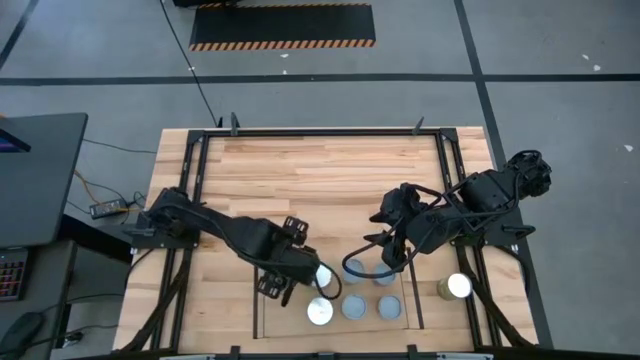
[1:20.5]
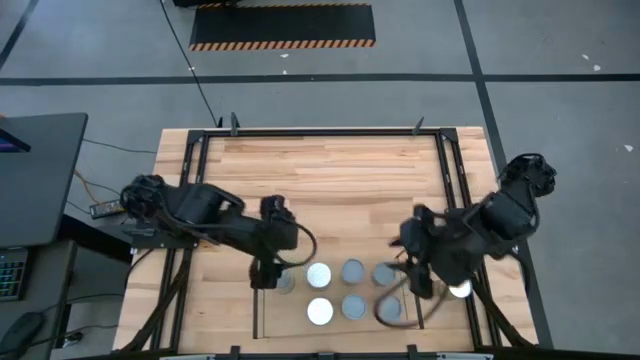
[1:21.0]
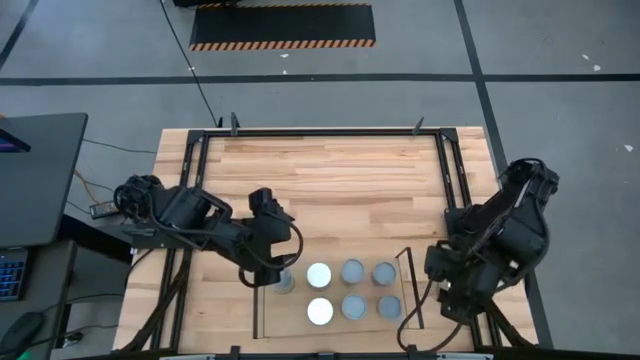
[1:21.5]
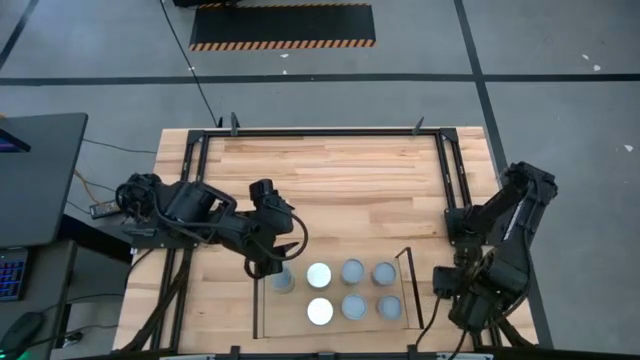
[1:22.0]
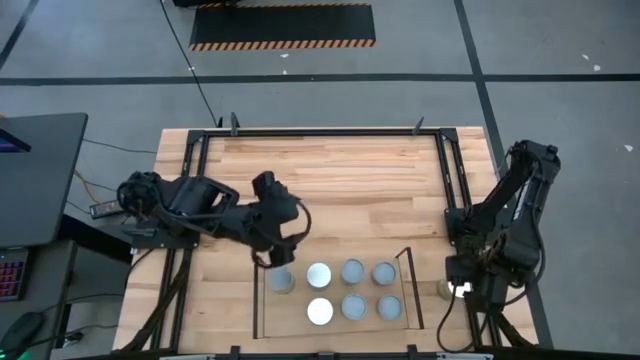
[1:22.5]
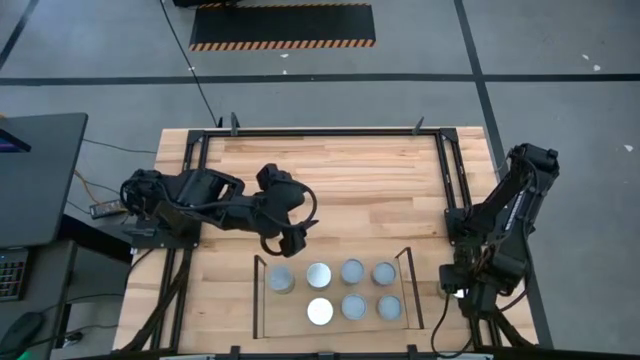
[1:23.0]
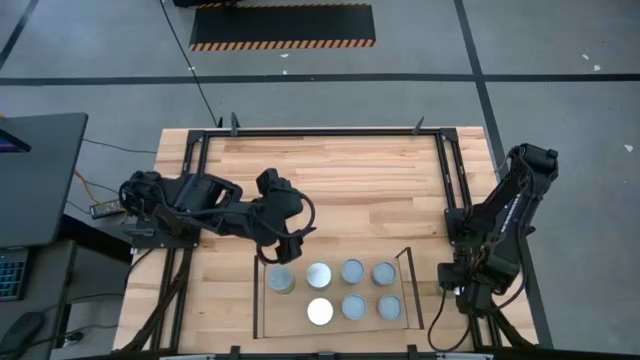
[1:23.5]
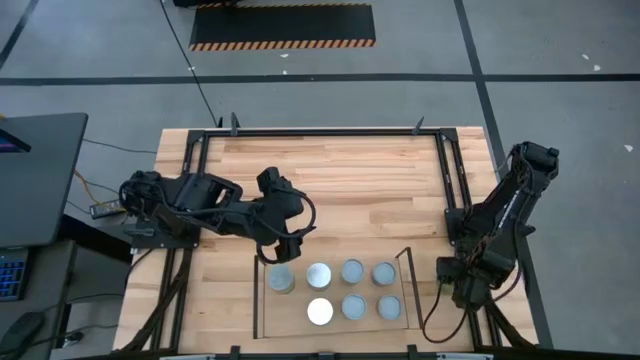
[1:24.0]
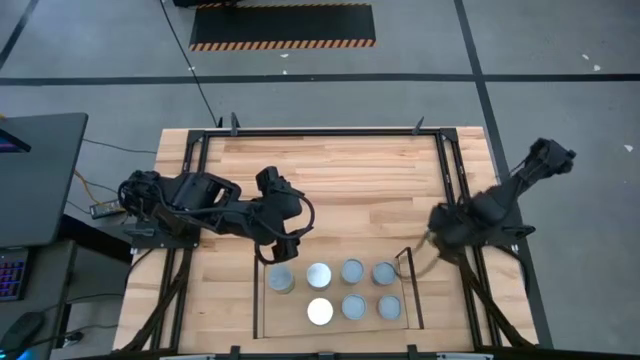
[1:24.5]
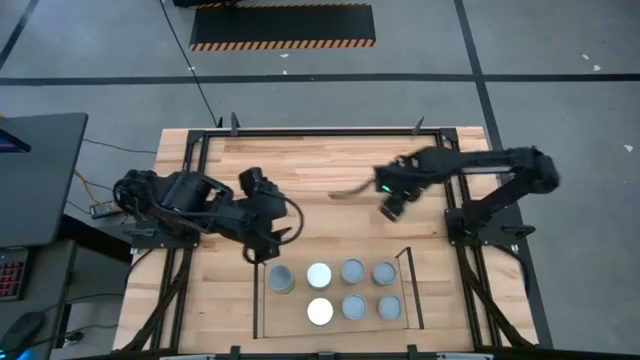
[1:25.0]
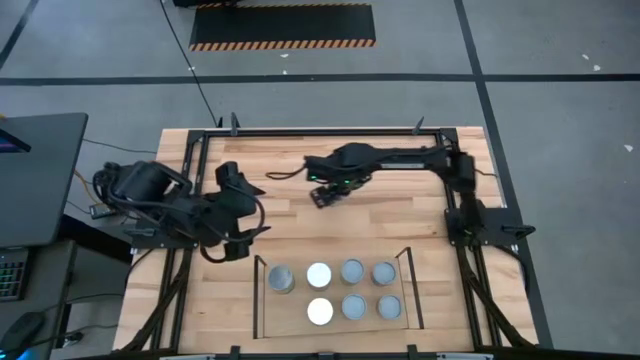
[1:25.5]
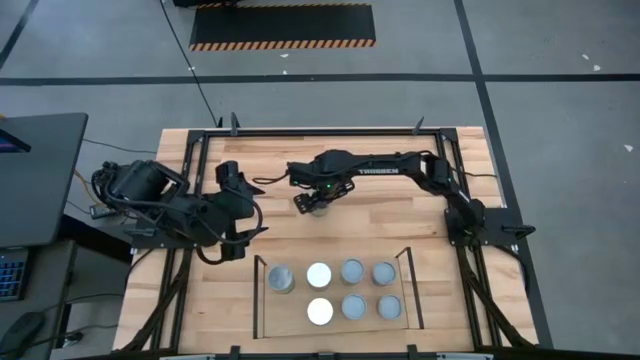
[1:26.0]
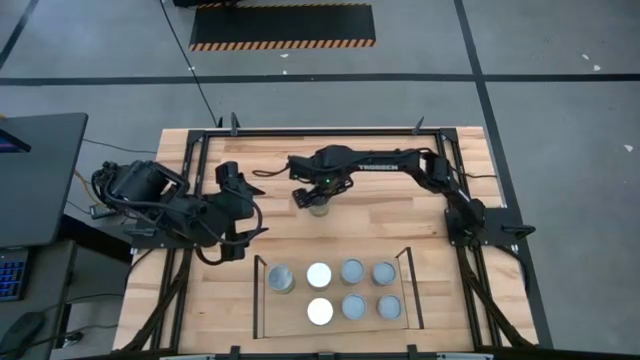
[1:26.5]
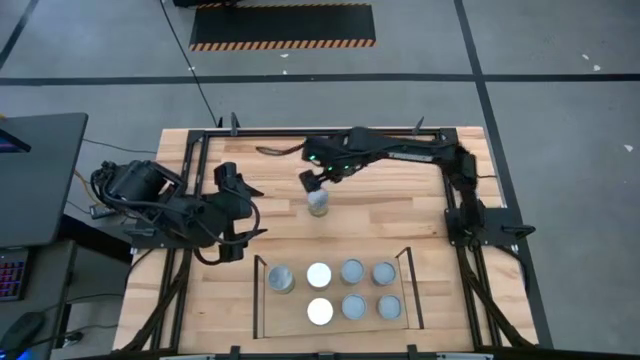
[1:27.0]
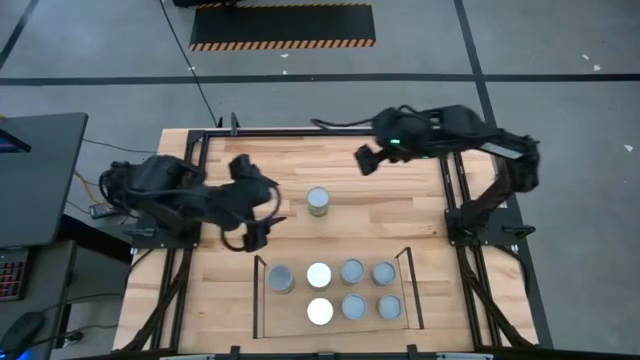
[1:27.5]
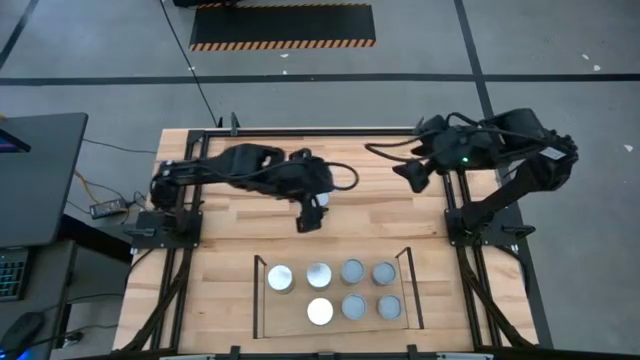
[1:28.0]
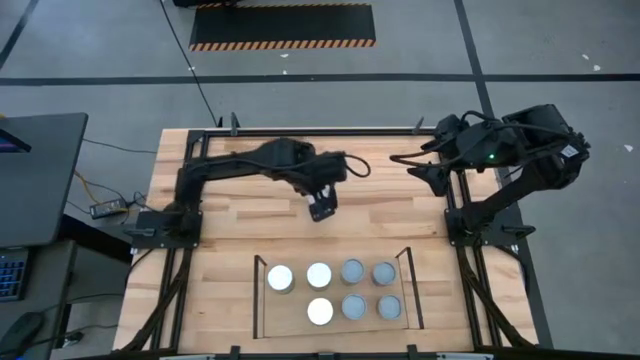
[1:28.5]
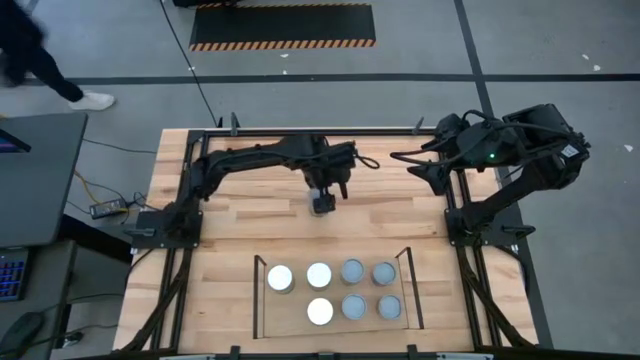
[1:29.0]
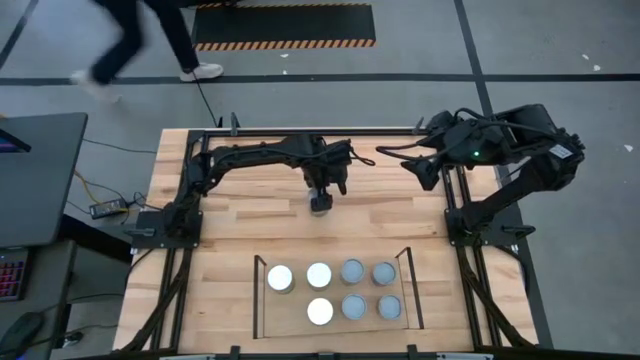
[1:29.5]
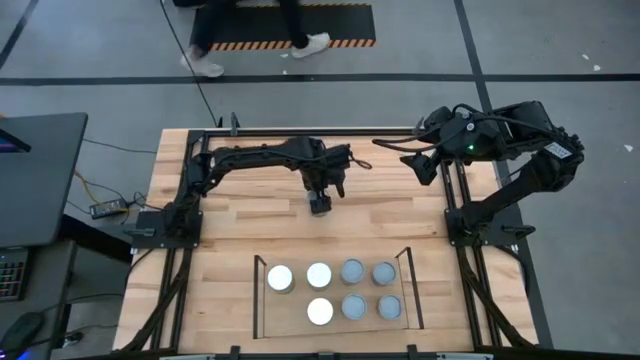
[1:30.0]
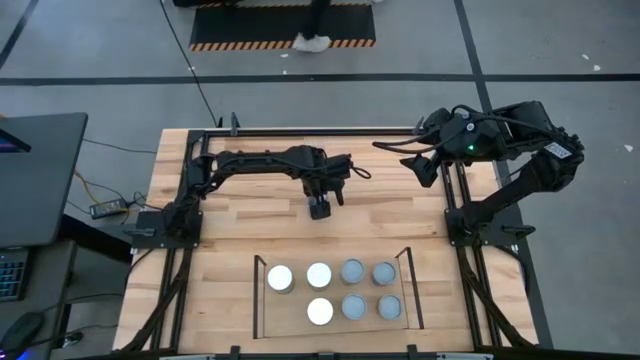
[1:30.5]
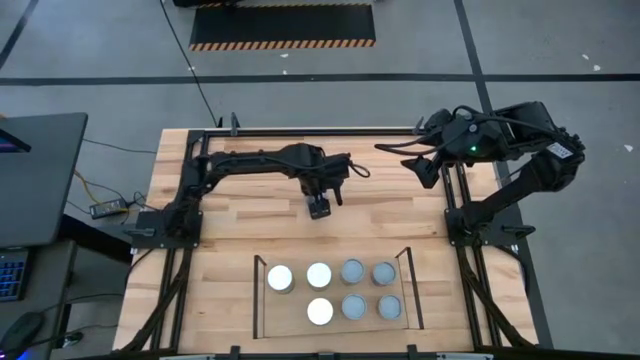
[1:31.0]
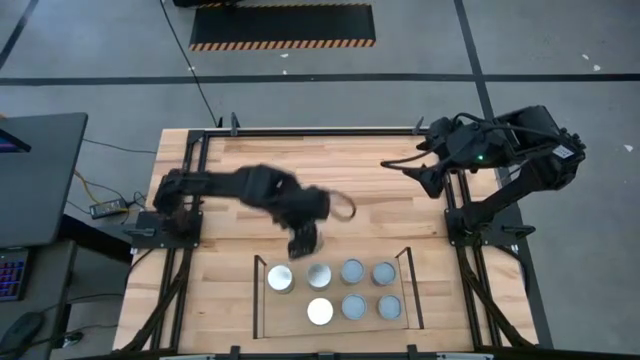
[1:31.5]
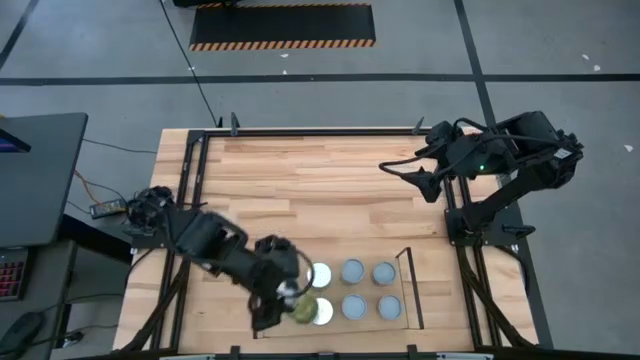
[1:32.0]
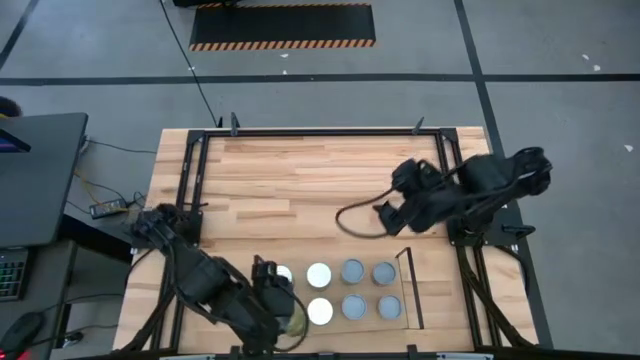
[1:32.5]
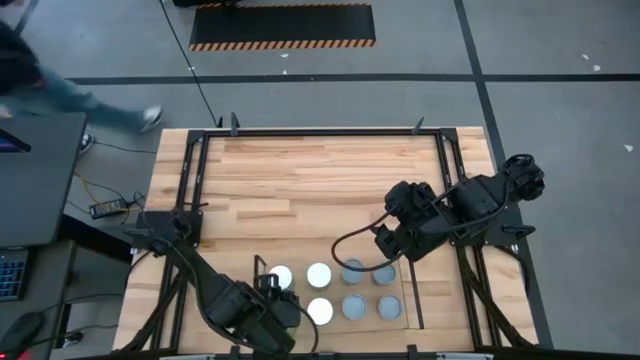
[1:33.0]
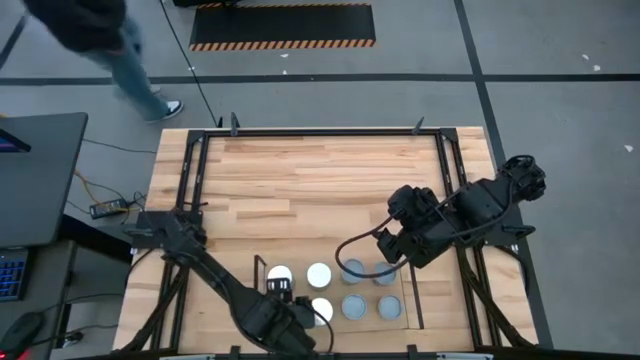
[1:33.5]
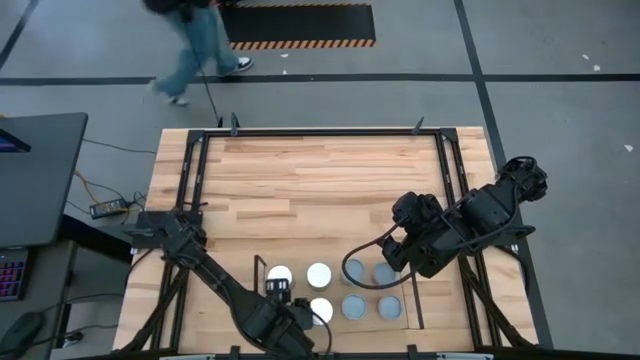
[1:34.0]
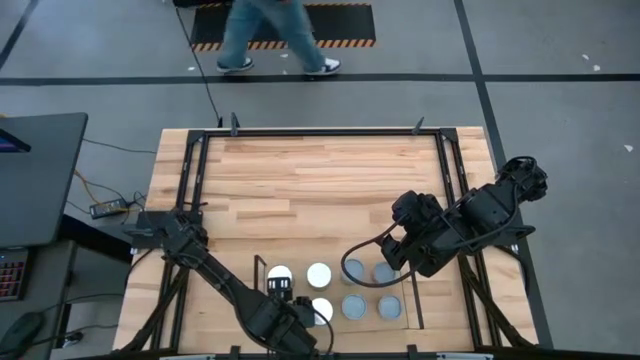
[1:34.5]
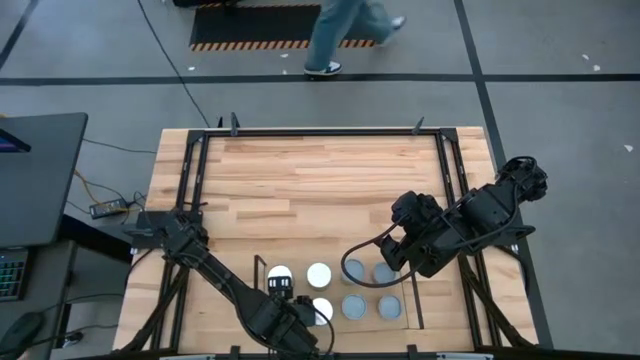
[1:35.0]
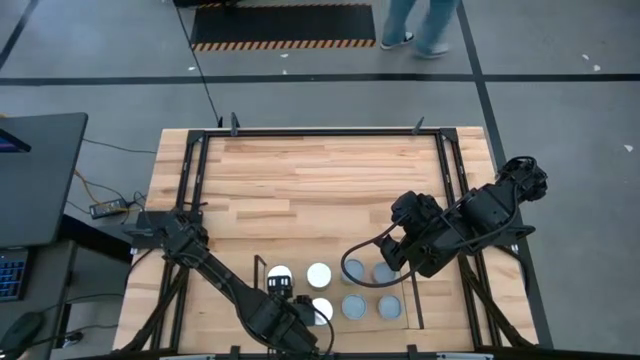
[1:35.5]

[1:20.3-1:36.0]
Task: Pick and place cans onto a shelf
Put the canned pears on the shelf aligned with the other canned pears

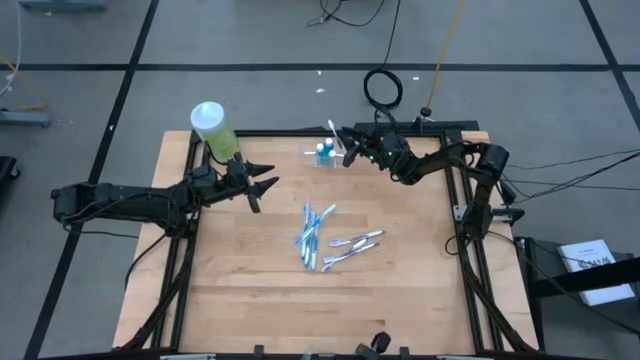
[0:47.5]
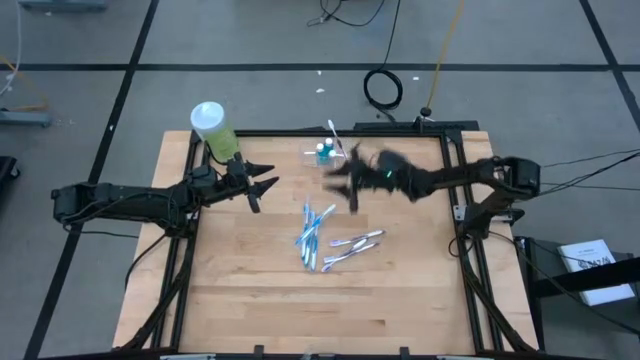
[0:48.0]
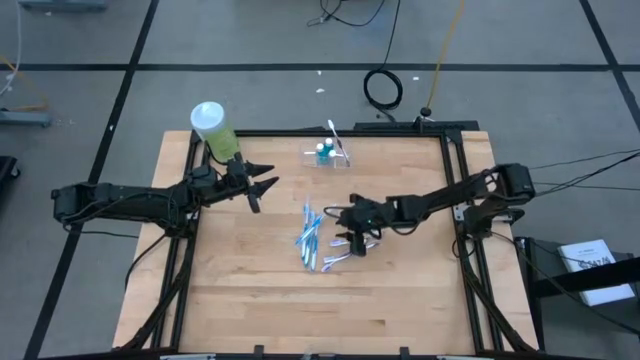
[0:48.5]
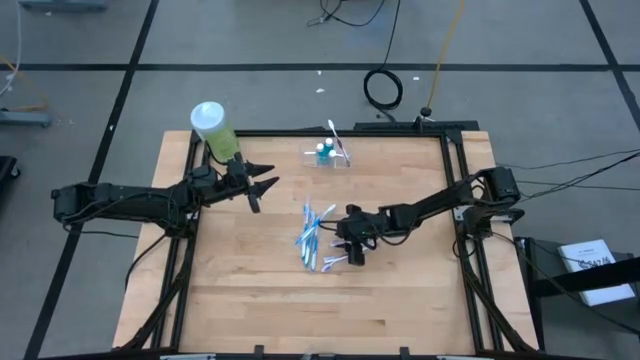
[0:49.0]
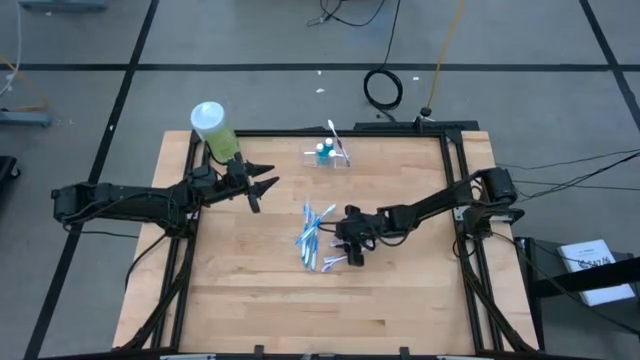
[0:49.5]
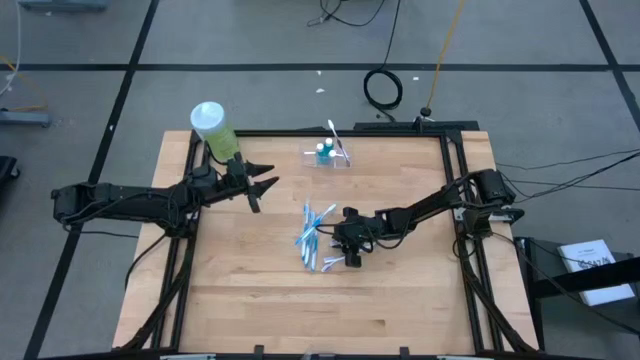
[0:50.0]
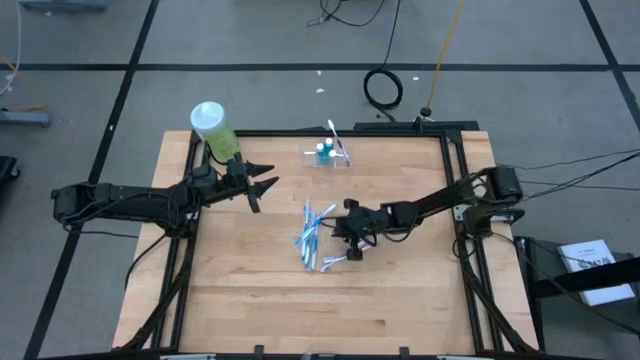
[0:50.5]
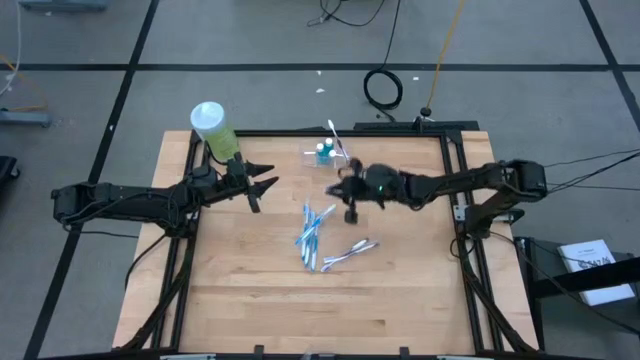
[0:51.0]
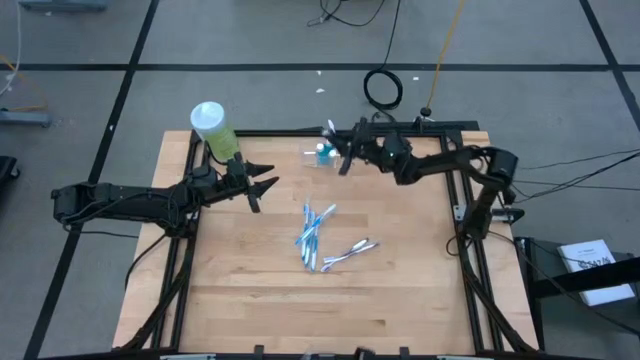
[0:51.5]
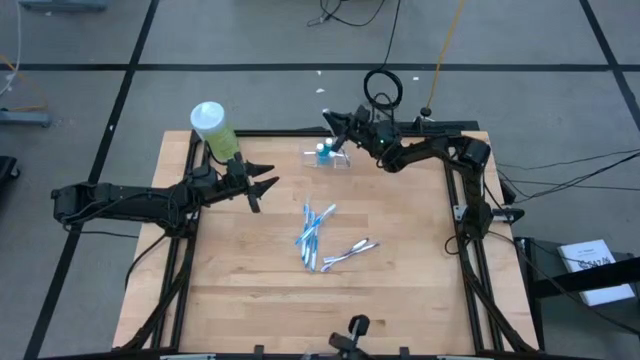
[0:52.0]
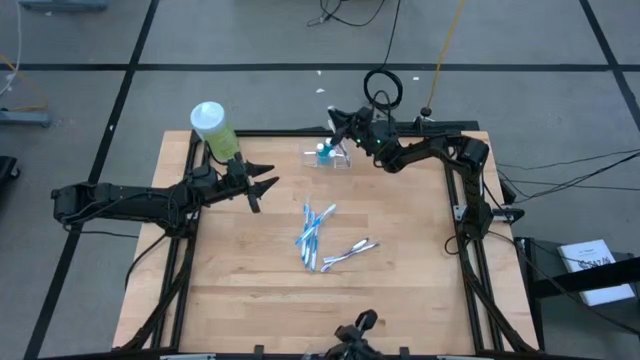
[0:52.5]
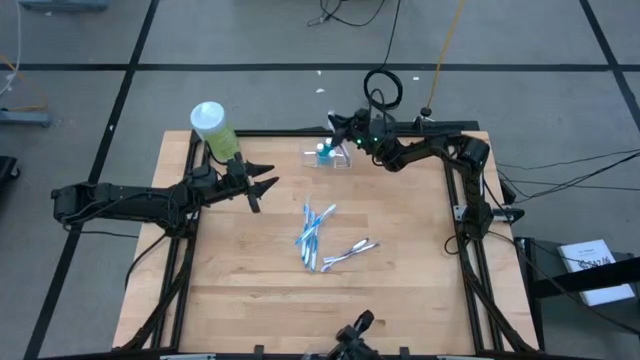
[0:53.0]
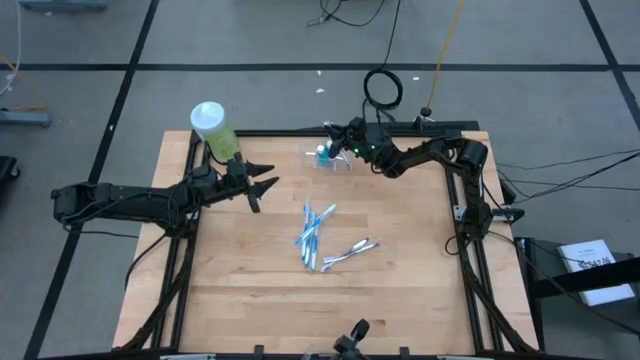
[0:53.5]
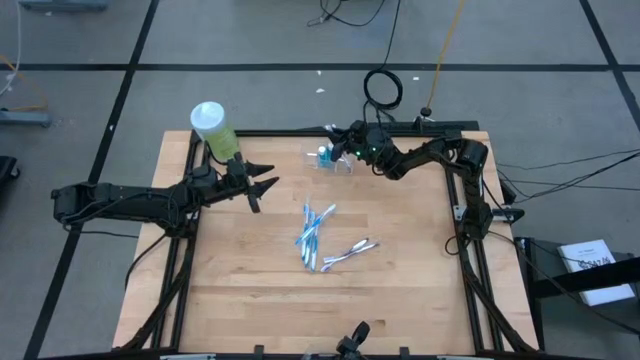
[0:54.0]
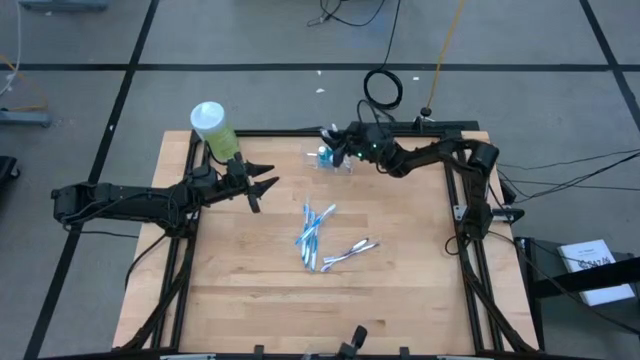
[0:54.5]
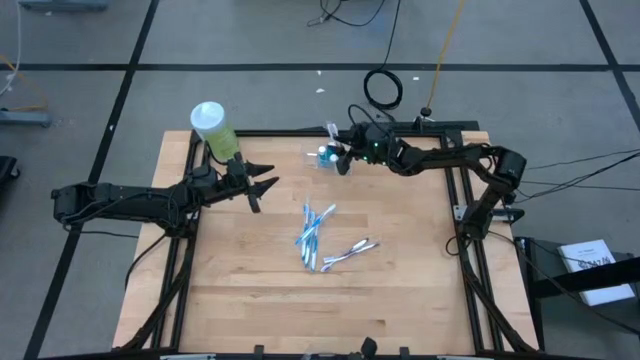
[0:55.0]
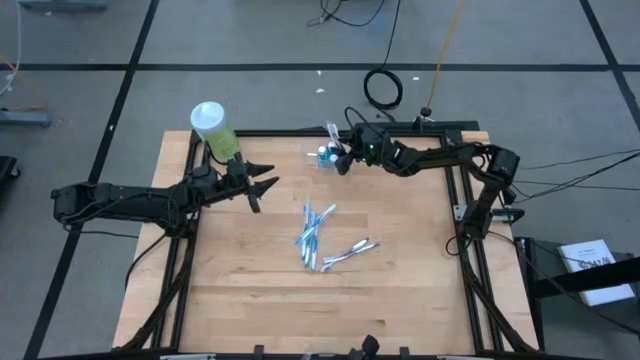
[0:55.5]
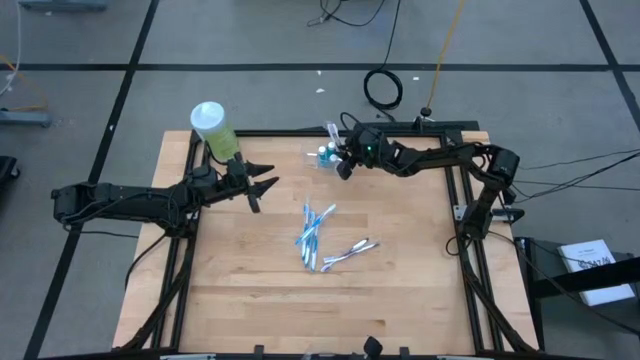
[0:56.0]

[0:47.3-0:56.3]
Task: Pick & Place toothbrushing station
Put the purple toothbrush into the transparent organizer
